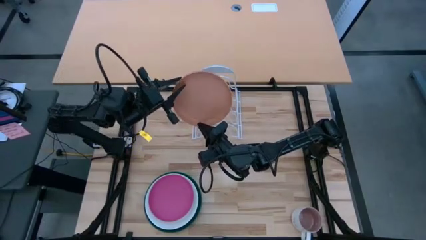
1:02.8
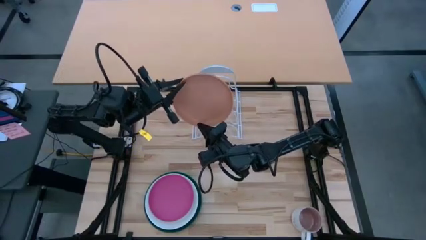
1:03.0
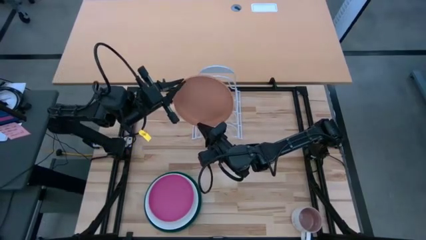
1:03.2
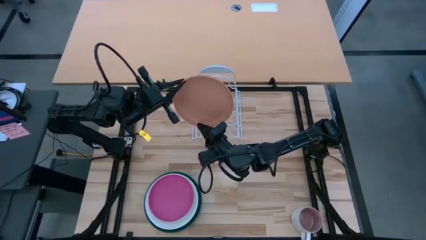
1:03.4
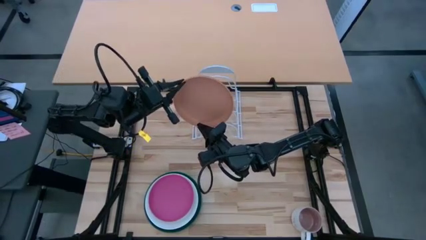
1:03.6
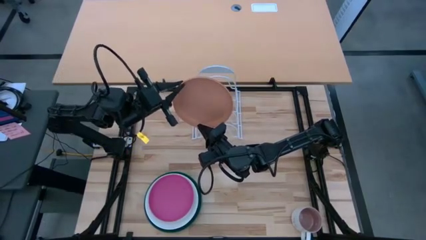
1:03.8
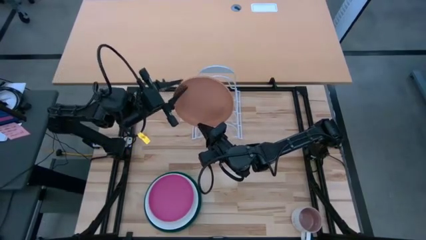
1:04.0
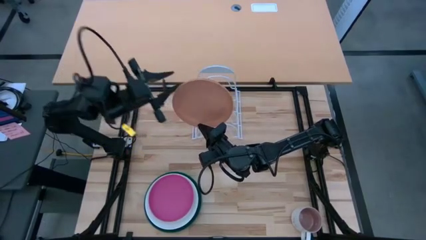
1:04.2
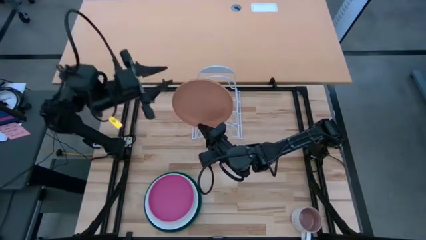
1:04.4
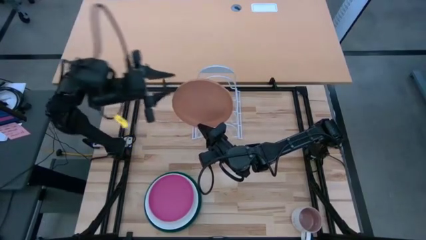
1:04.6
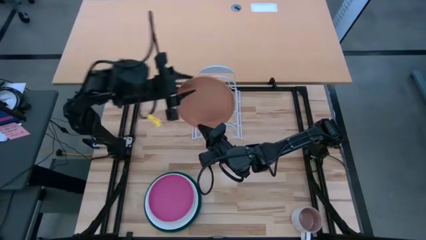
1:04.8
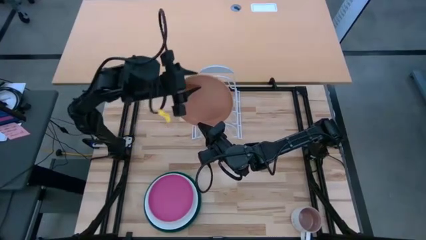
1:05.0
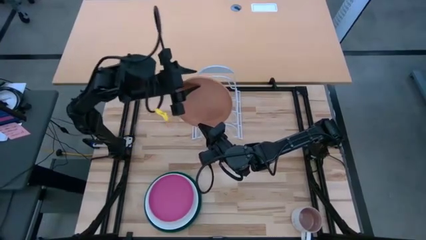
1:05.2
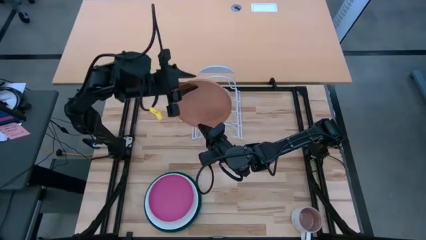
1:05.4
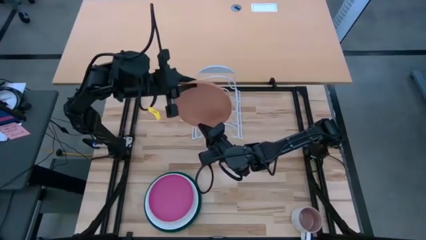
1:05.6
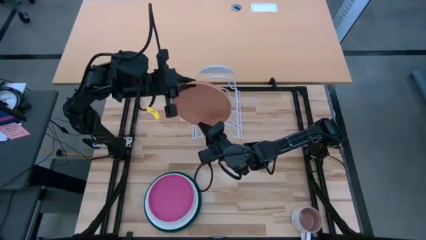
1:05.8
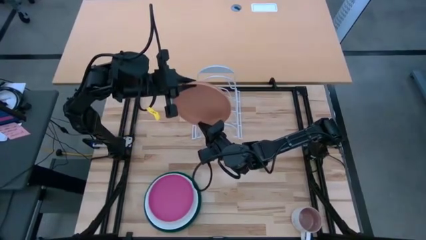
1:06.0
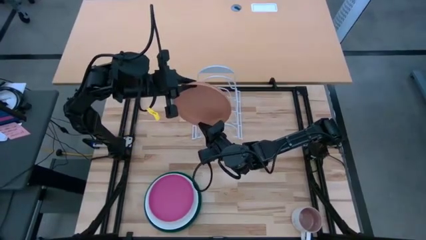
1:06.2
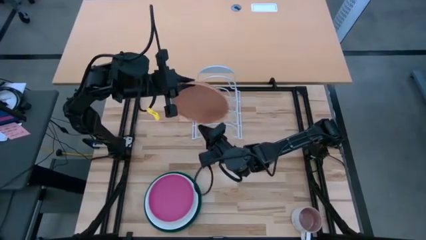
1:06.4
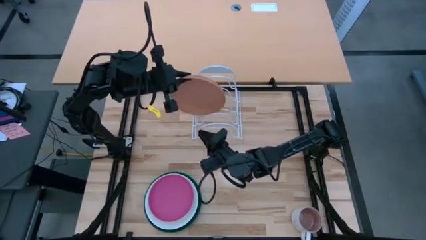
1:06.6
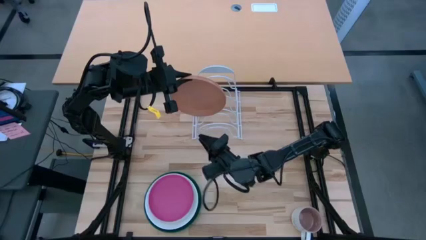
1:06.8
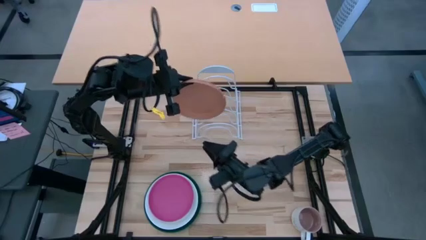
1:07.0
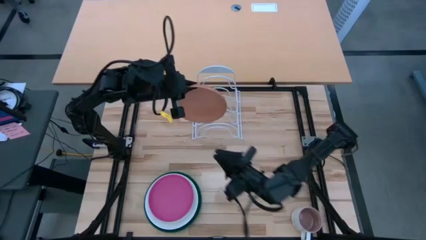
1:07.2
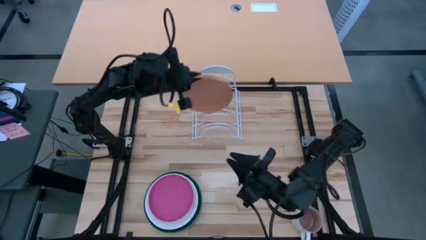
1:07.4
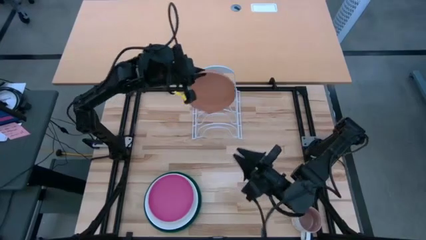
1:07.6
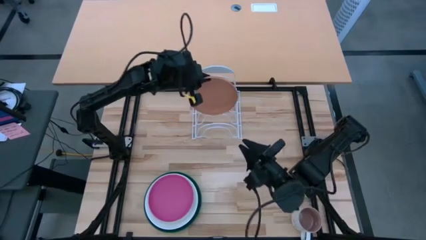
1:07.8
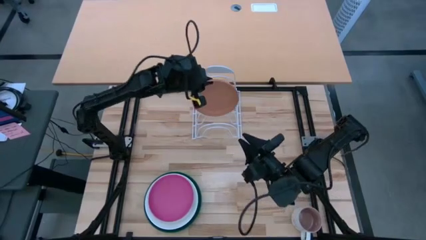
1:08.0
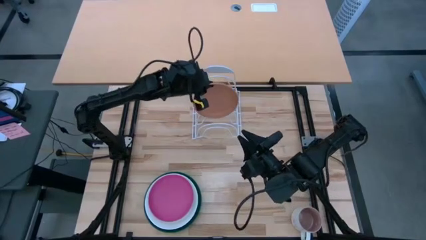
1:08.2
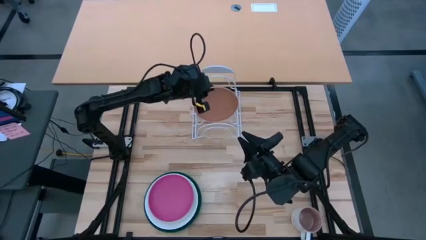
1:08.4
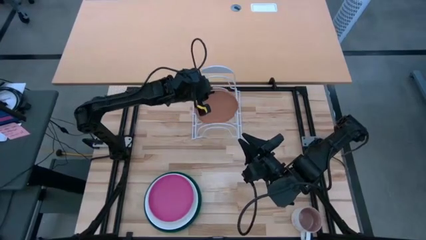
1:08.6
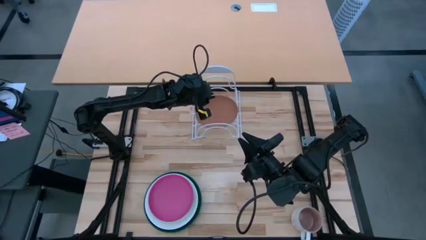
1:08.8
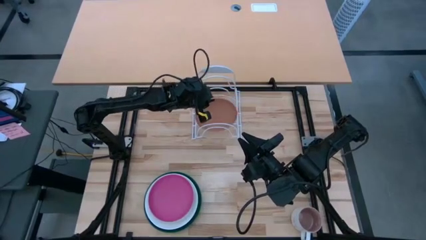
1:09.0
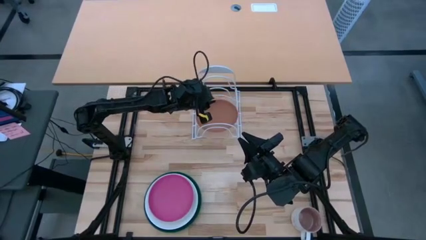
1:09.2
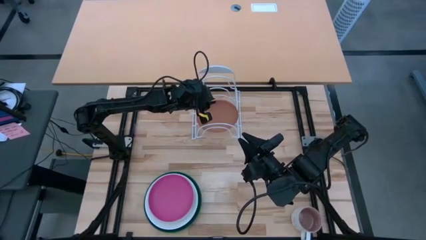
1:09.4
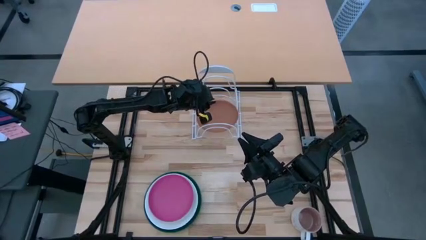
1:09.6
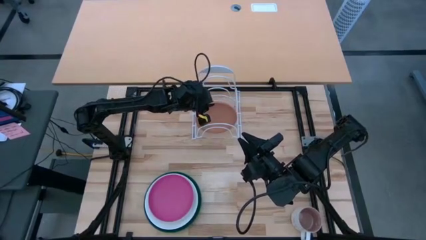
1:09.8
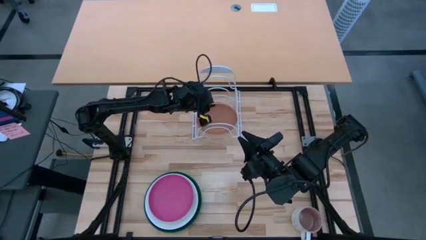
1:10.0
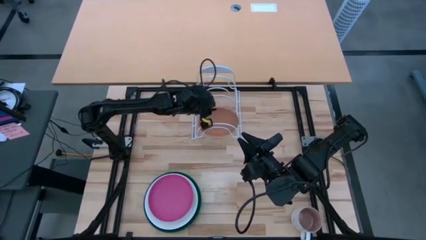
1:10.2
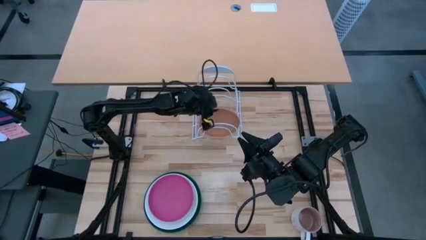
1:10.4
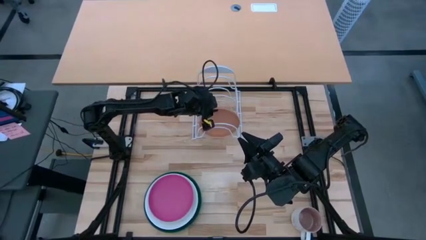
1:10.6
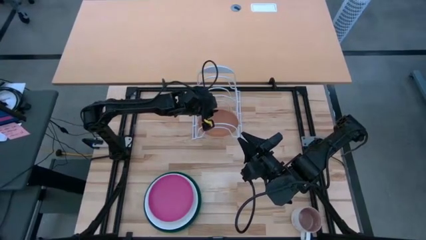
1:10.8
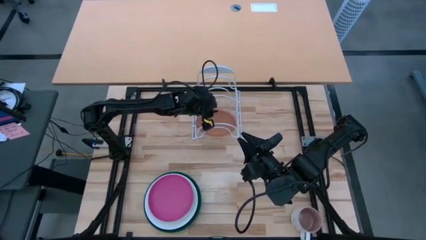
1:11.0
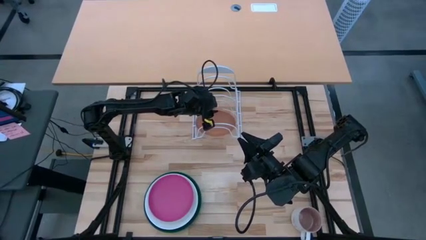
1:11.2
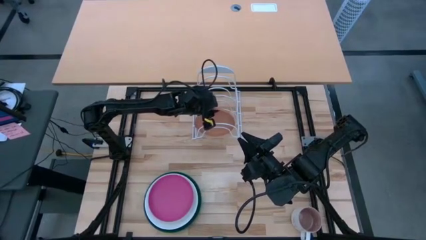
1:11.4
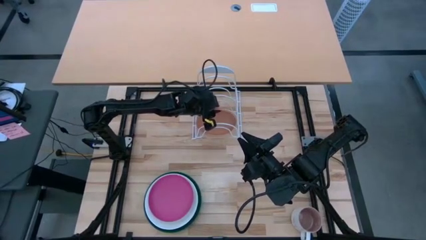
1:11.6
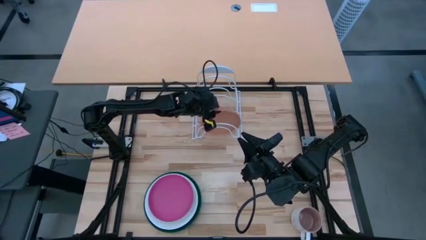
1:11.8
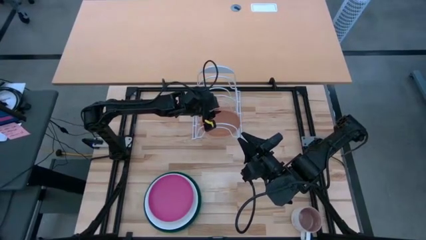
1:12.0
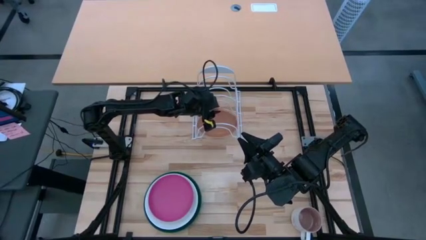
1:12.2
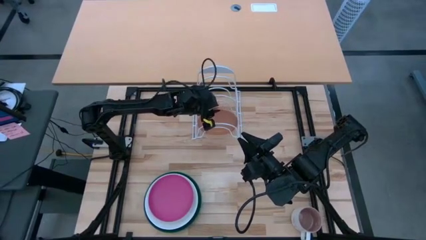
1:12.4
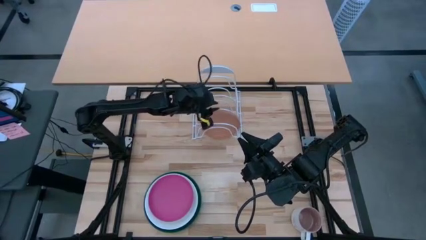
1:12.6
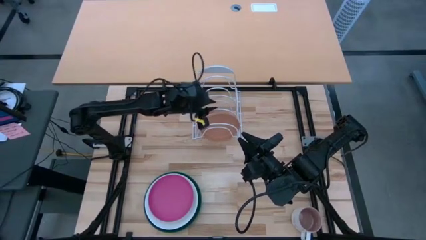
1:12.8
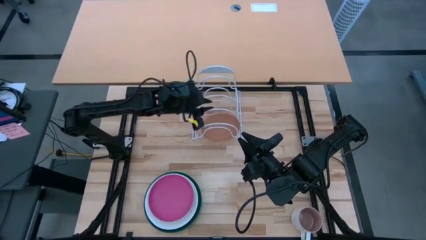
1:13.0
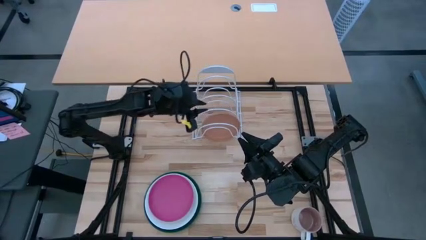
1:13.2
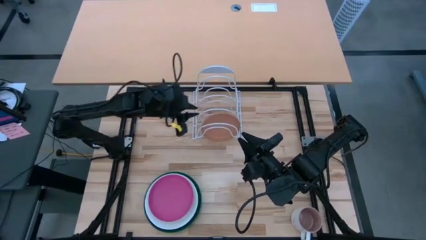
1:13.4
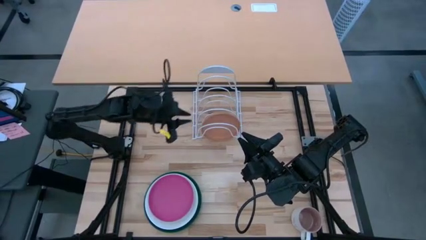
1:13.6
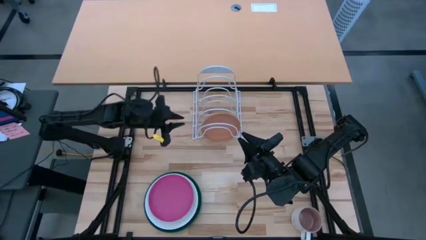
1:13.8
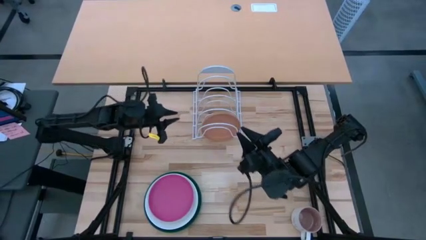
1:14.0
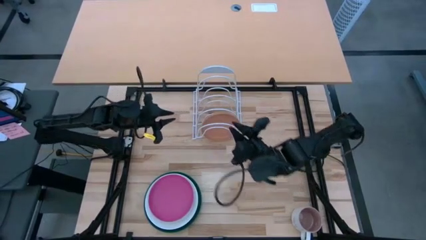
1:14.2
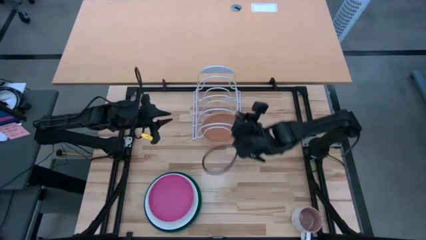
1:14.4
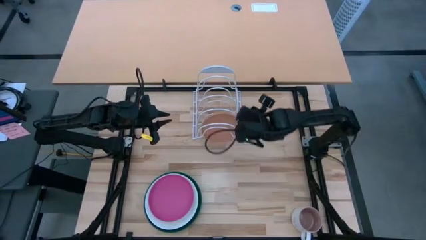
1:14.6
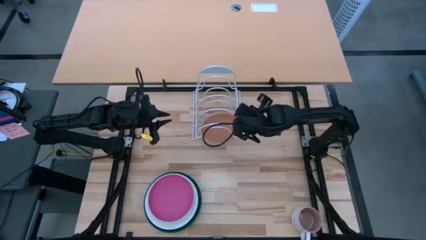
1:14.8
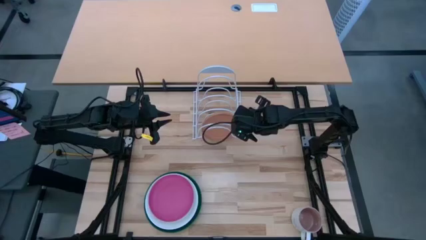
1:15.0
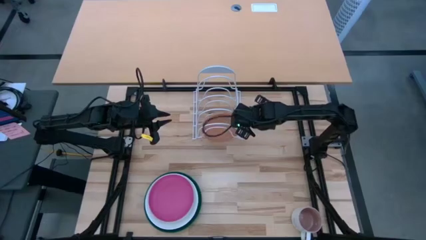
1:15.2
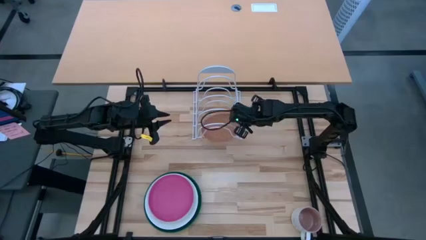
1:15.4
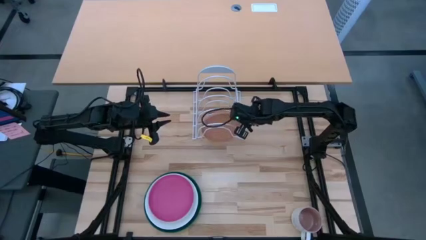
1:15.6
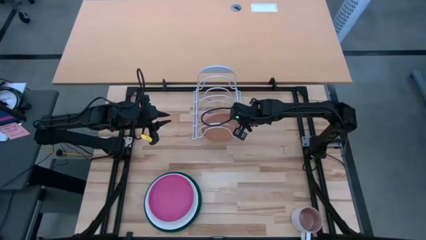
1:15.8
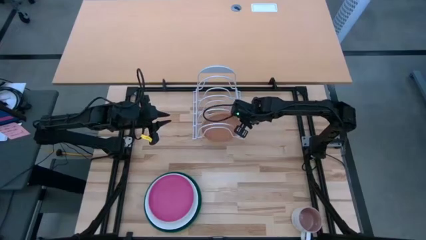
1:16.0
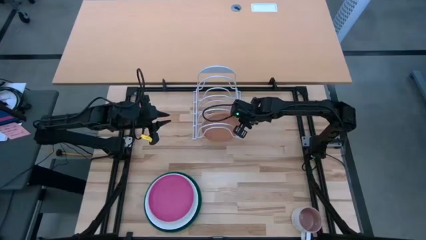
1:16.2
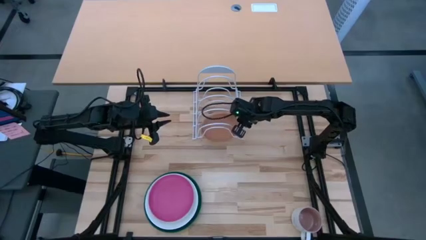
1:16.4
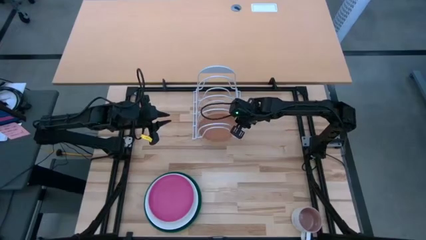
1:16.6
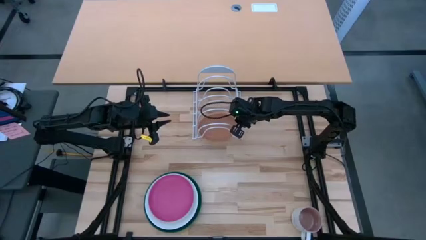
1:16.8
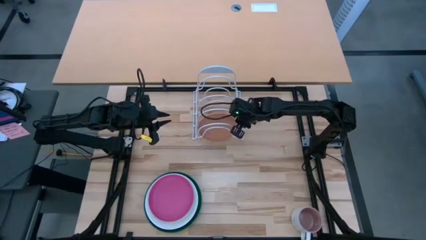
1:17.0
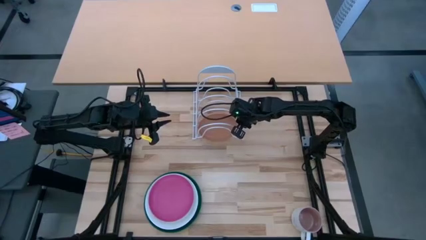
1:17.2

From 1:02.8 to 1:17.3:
Task: Sort dishes
Put the orange plate on the dish rack
